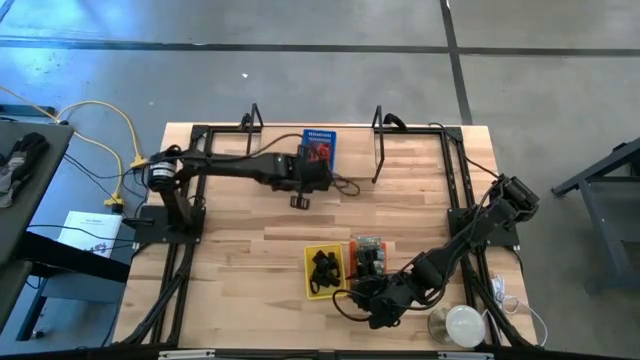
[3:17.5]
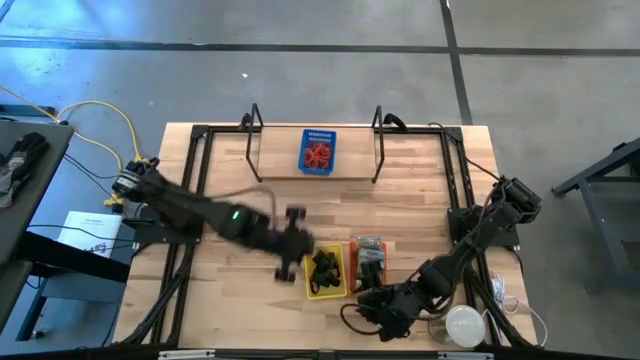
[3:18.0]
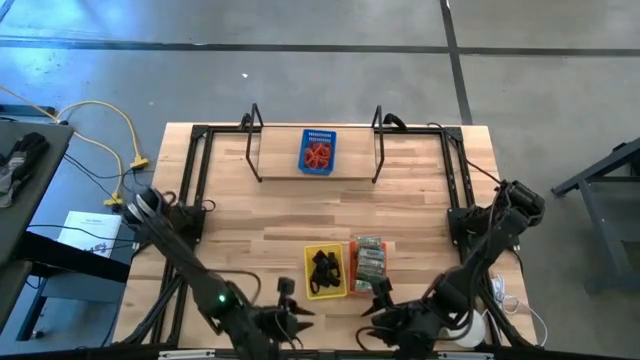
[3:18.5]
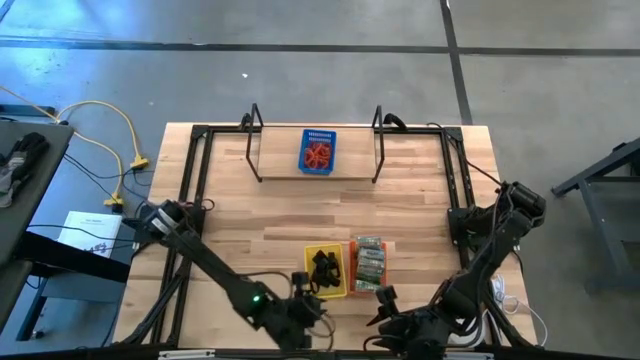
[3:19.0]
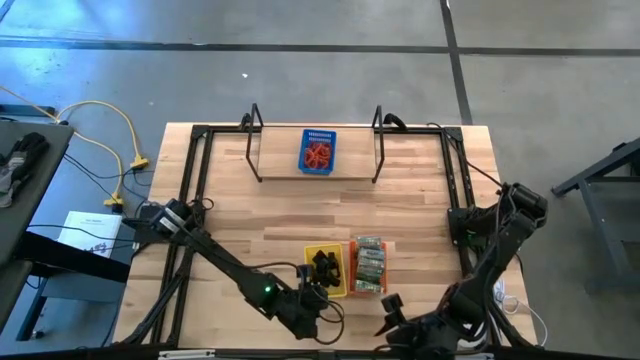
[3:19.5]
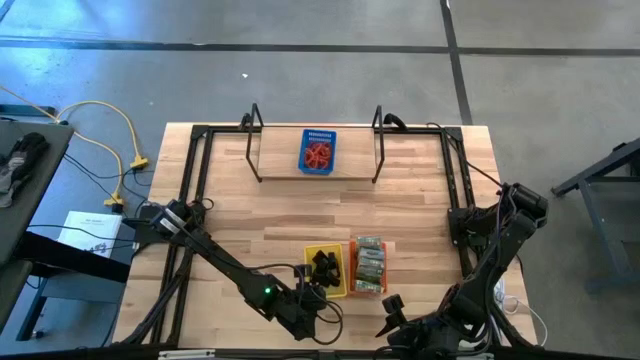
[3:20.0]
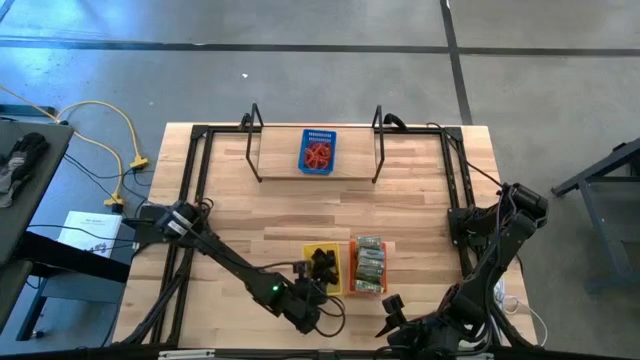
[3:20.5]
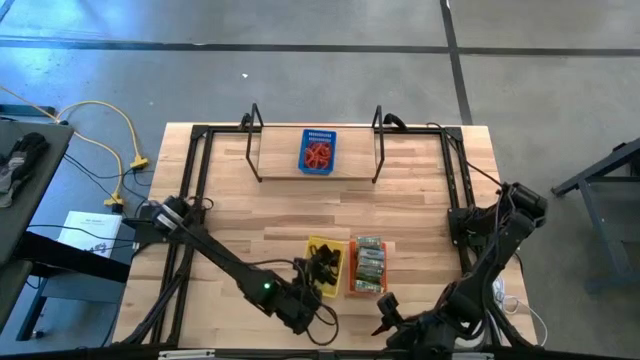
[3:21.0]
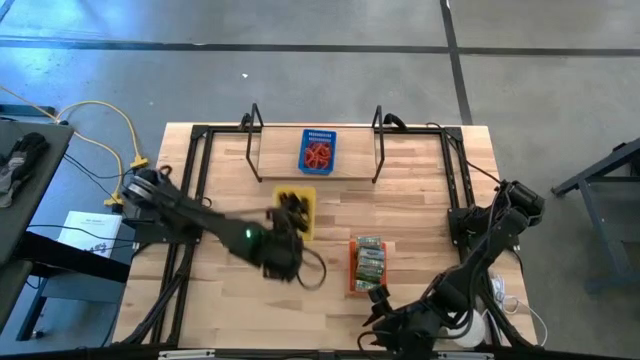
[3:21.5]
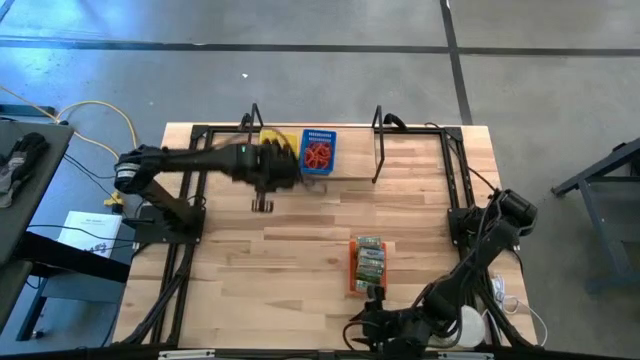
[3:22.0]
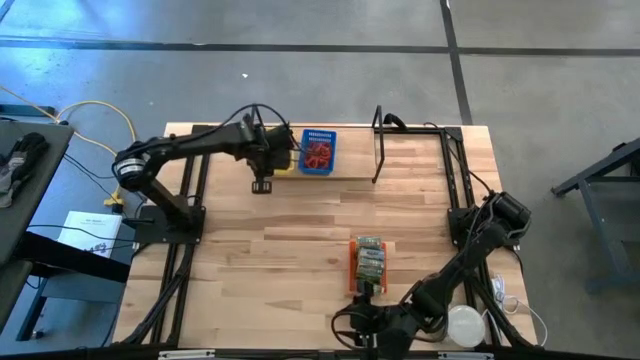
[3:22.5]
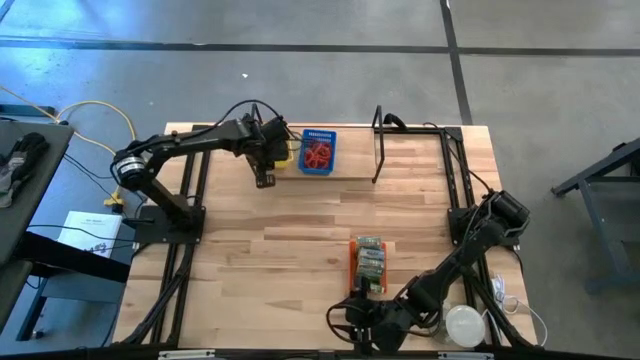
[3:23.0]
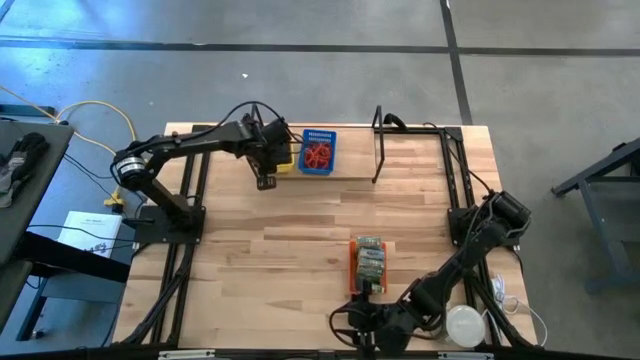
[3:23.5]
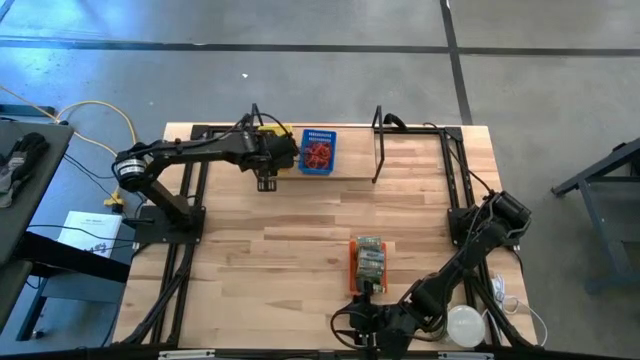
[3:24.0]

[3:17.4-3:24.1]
Task: Pick & Place Office Desk Supplies
Put the yellow basket on the shelf

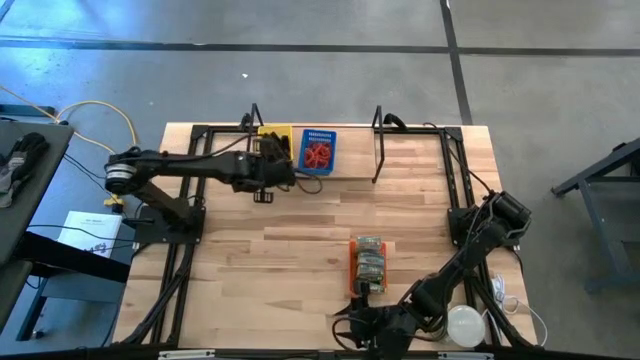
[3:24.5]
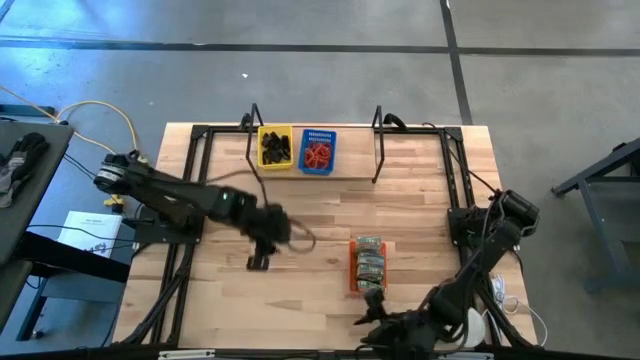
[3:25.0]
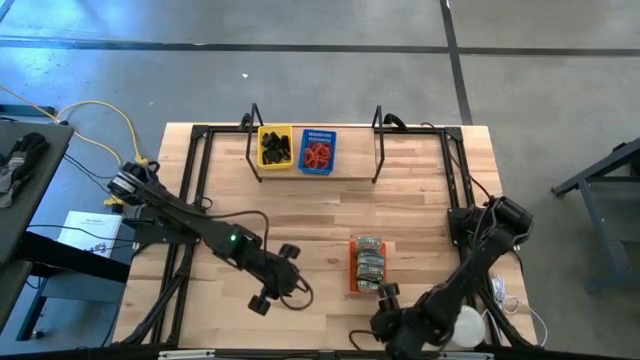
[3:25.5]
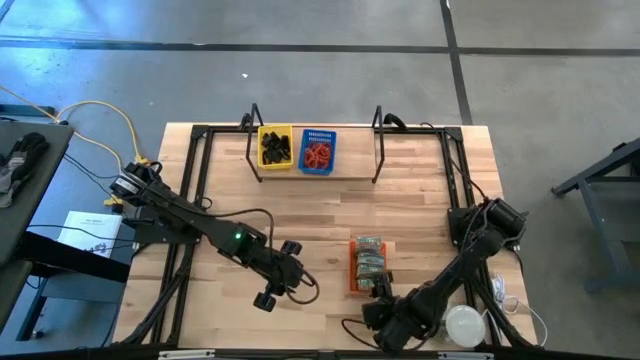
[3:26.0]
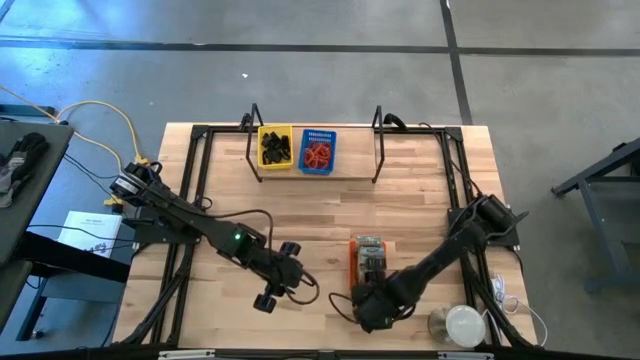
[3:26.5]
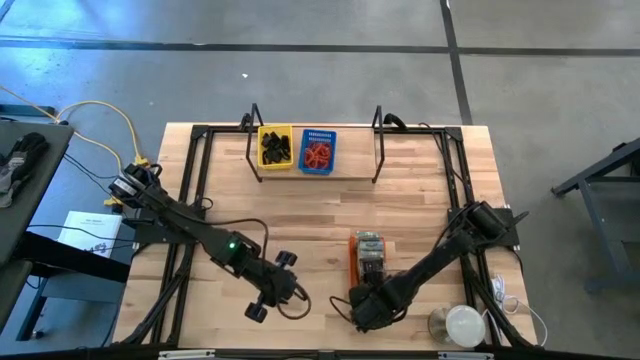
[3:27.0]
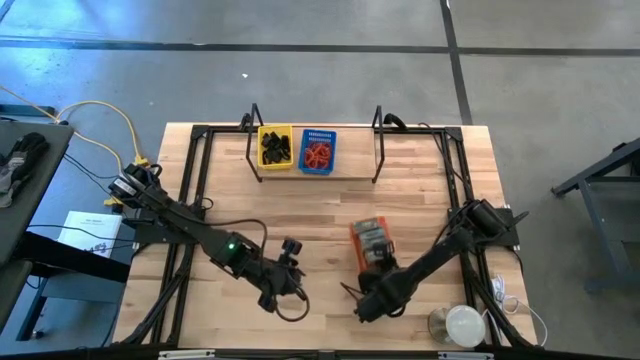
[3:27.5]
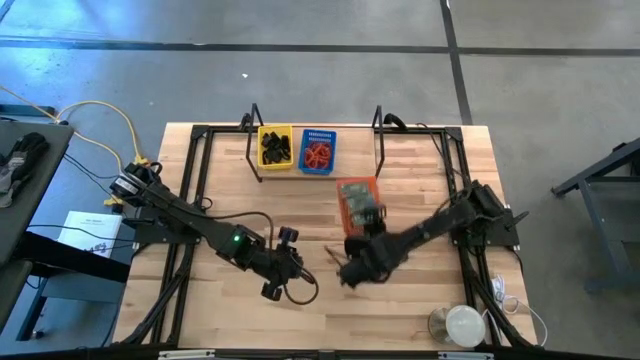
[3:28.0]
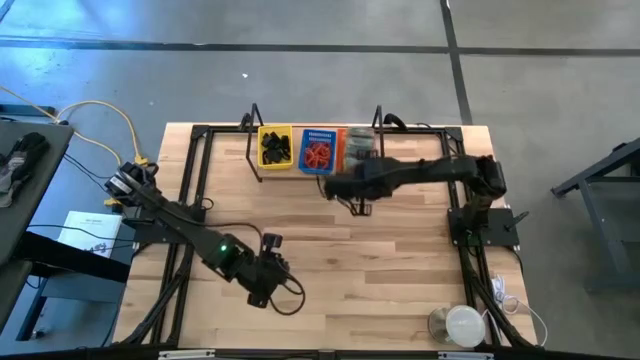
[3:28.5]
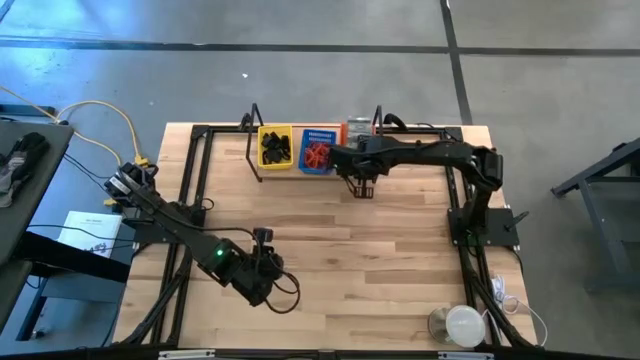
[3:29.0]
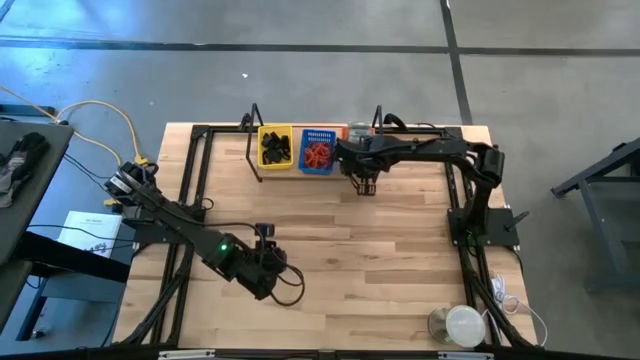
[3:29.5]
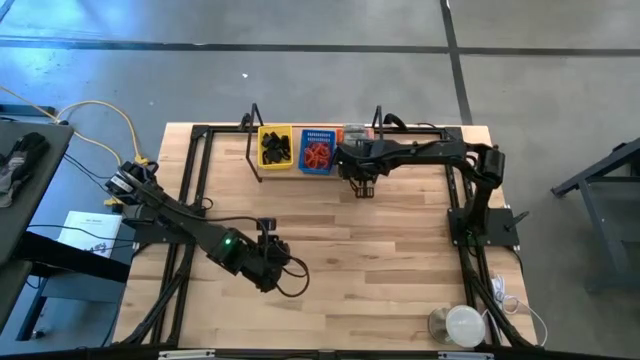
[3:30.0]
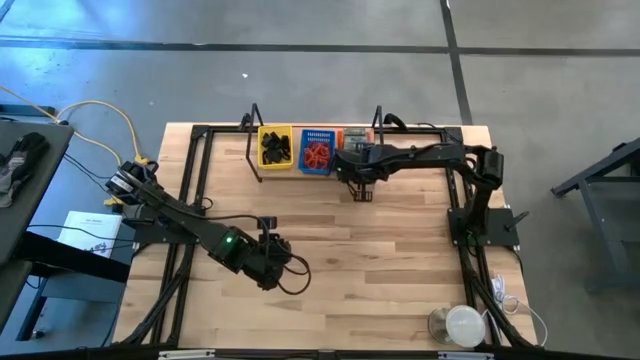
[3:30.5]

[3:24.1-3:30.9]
Put the orange basket on the shelf

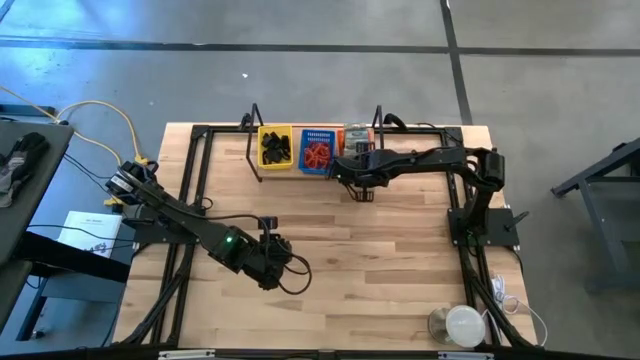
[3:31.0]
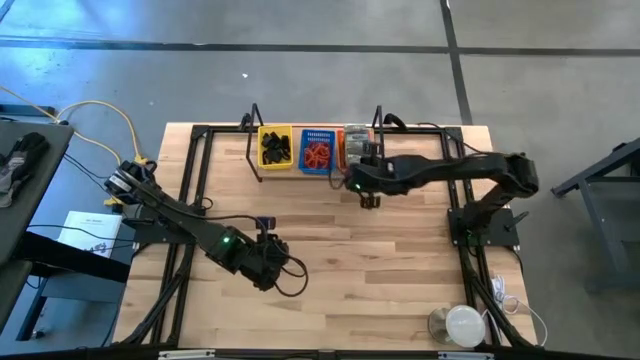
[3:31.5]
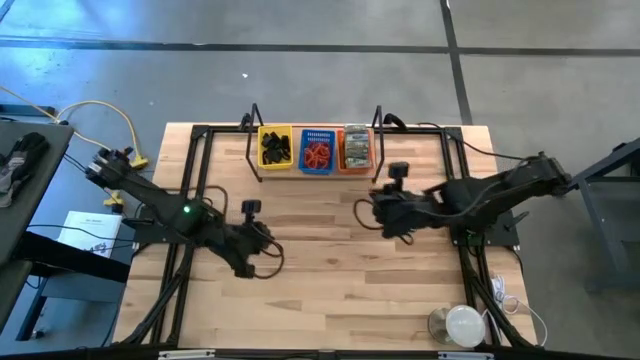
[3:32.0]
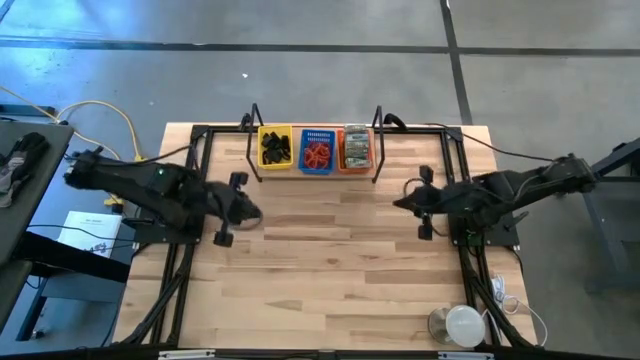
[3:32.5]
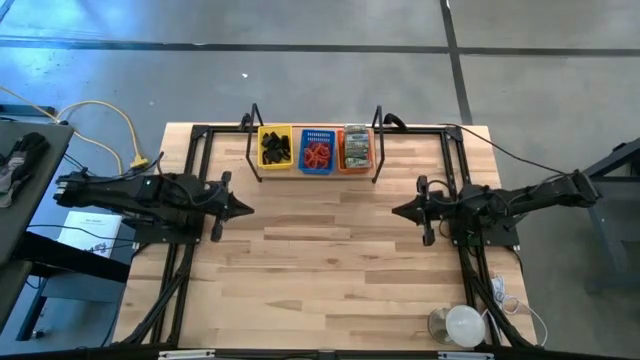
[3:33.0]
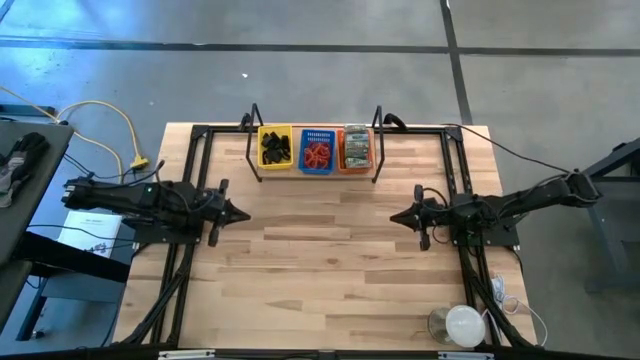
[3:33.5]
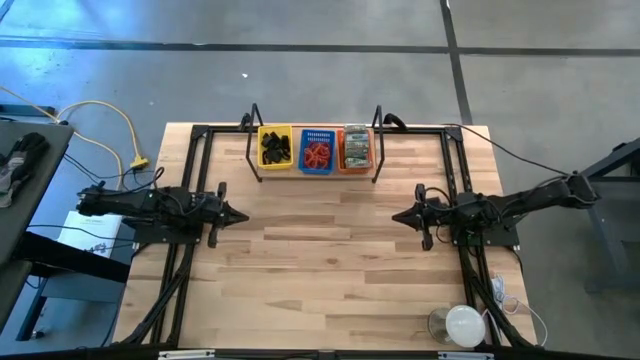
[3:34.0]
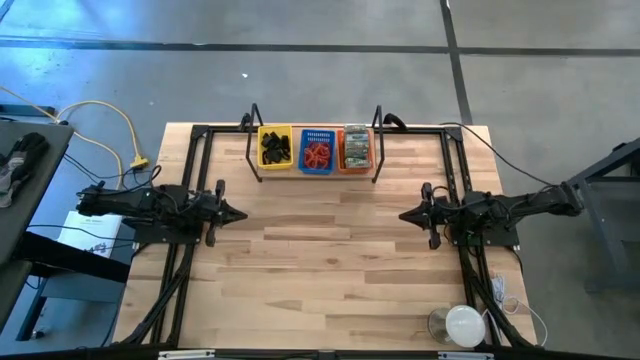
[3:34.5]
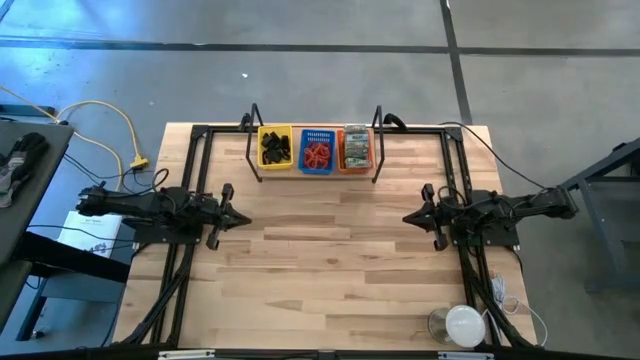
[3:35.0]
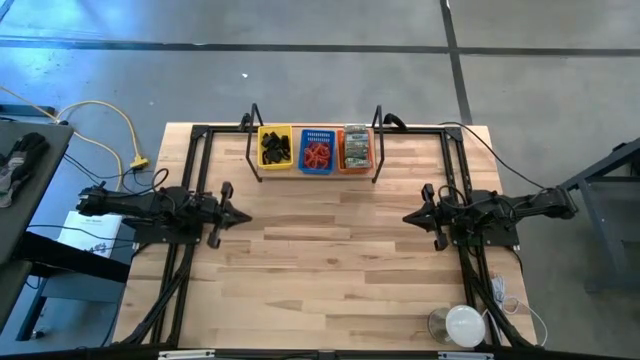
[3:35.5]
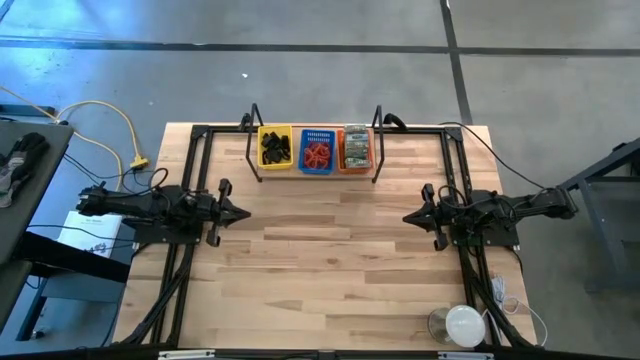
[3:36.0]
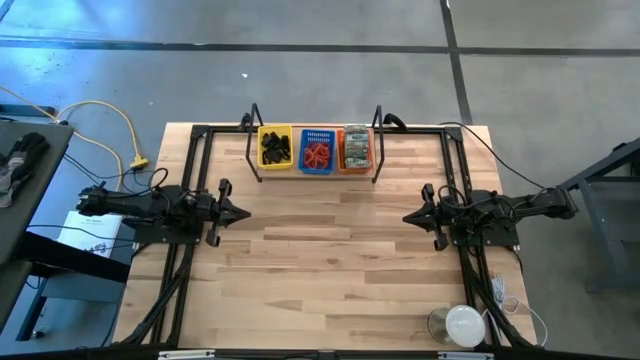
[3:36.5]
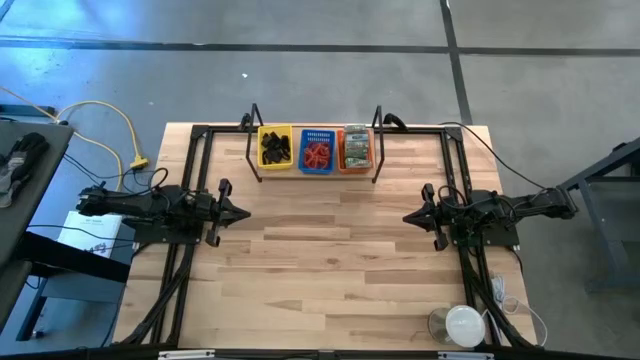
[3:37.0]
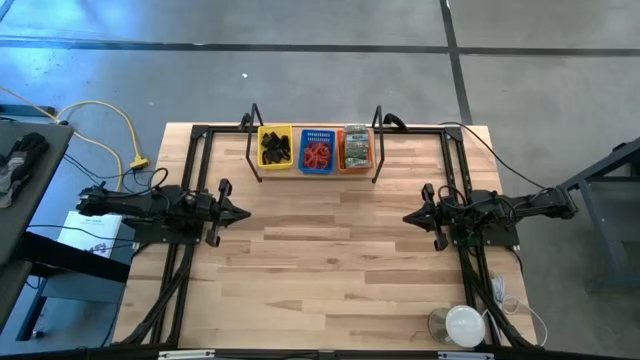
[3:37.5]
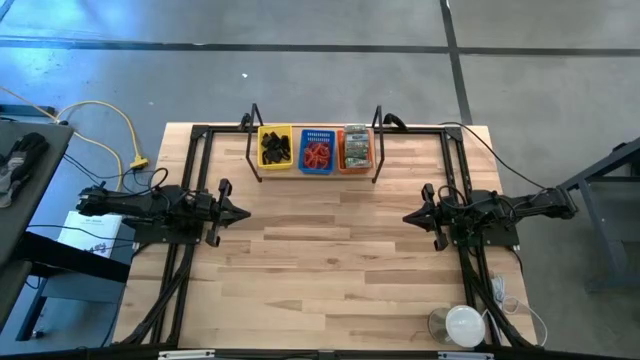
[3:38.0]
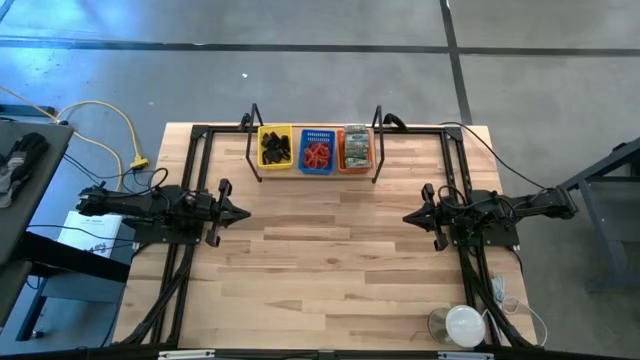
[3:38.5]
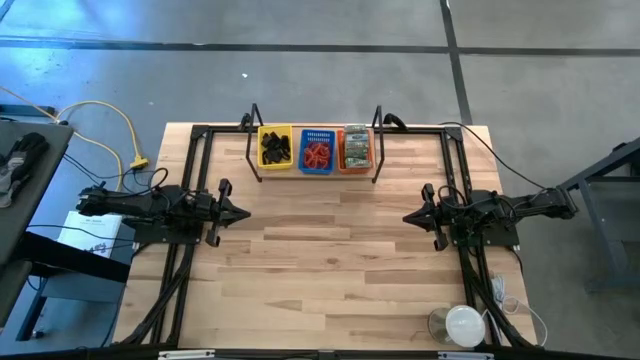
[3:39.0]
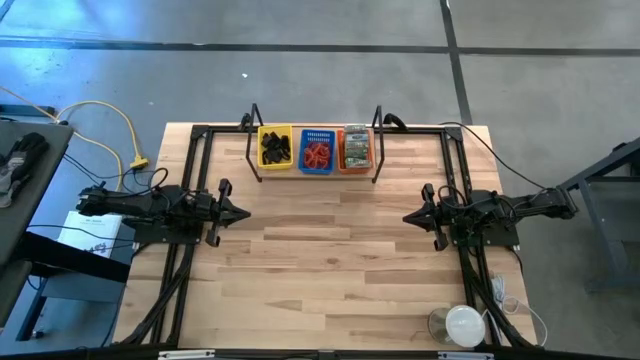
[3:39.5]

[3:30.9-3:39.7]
Return to Home Position
